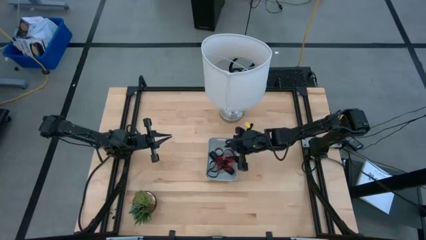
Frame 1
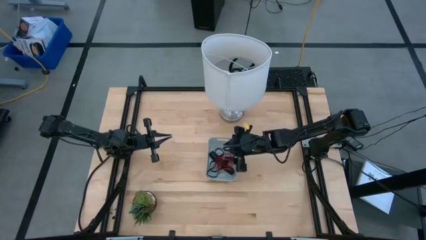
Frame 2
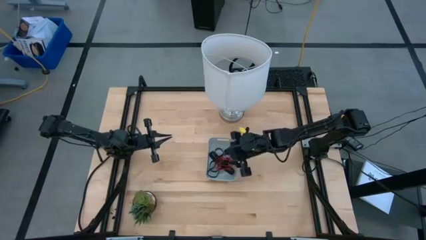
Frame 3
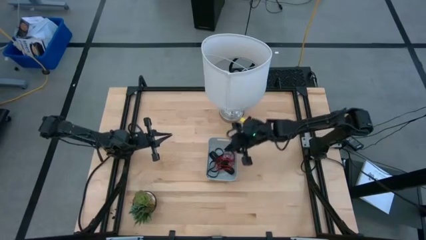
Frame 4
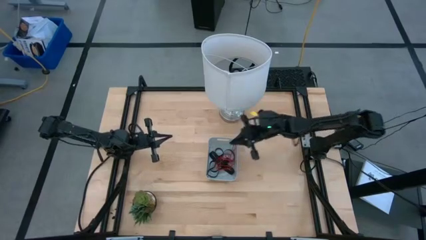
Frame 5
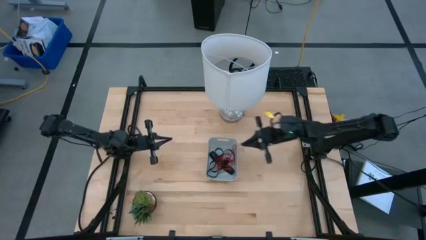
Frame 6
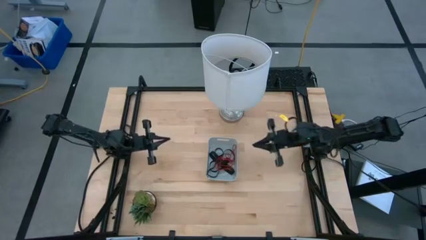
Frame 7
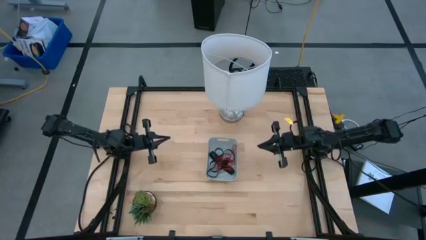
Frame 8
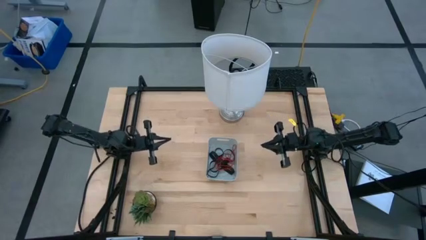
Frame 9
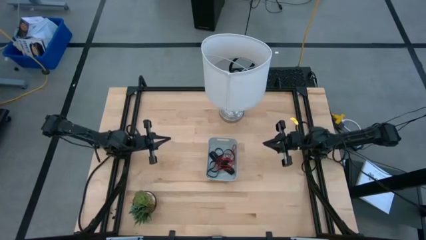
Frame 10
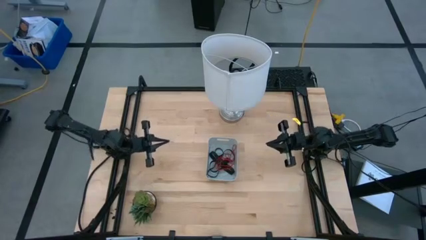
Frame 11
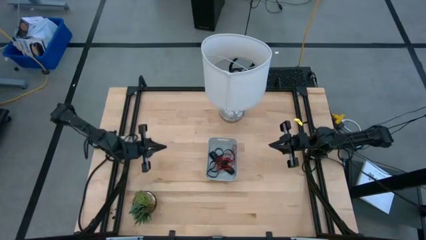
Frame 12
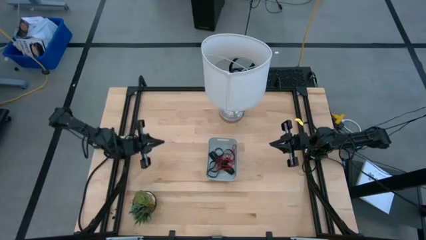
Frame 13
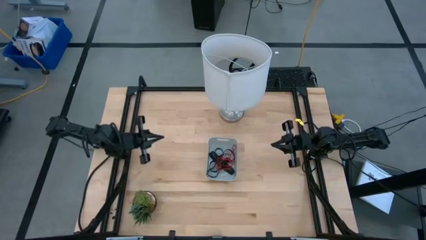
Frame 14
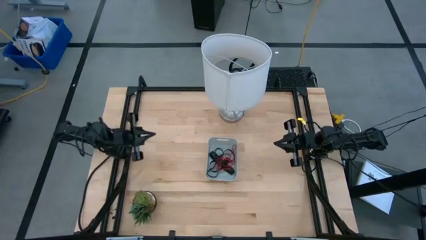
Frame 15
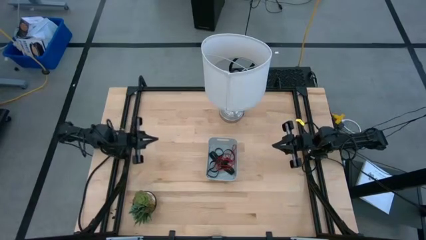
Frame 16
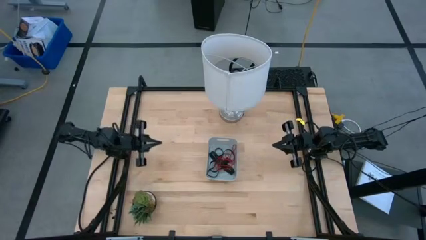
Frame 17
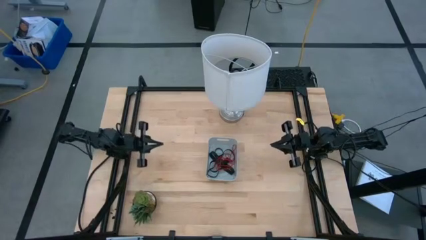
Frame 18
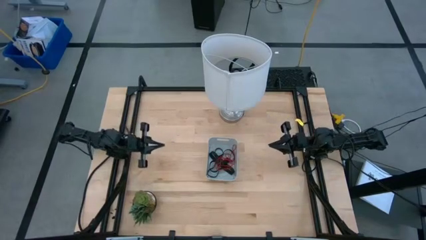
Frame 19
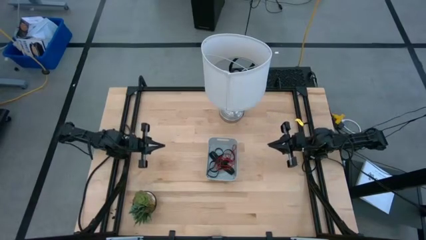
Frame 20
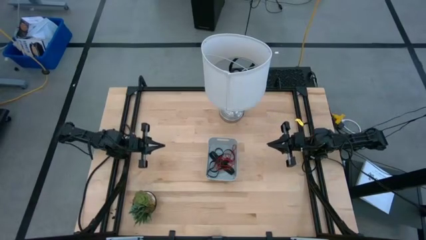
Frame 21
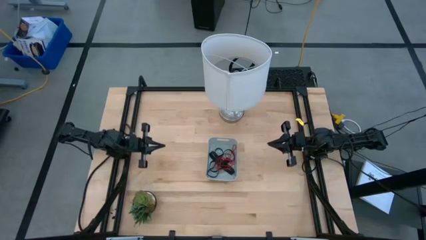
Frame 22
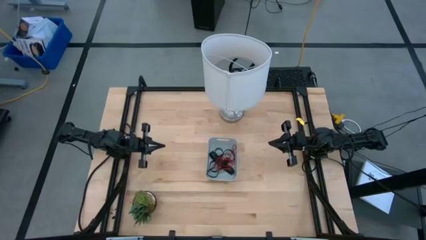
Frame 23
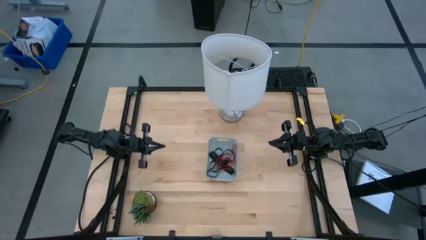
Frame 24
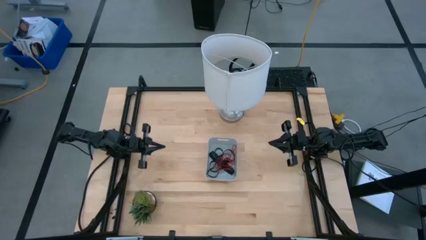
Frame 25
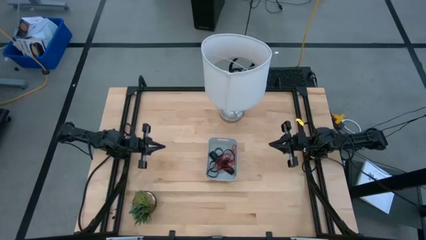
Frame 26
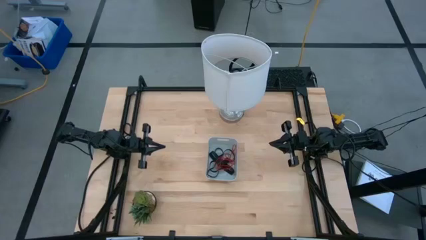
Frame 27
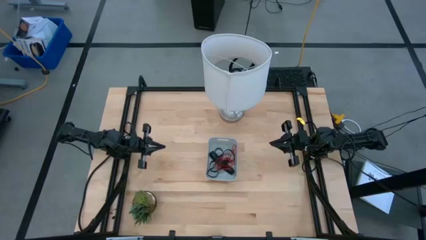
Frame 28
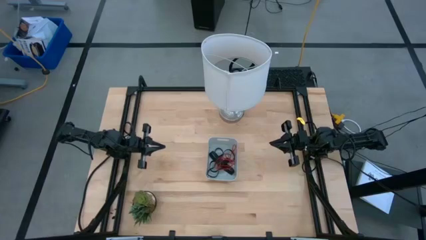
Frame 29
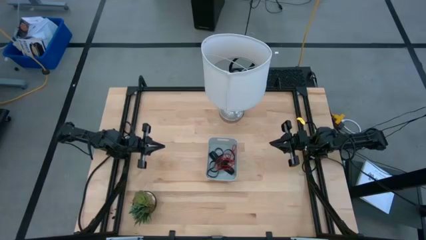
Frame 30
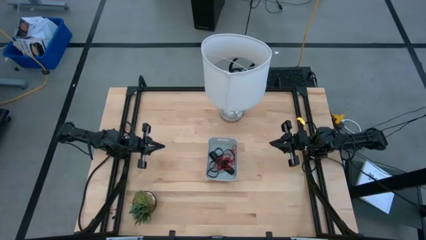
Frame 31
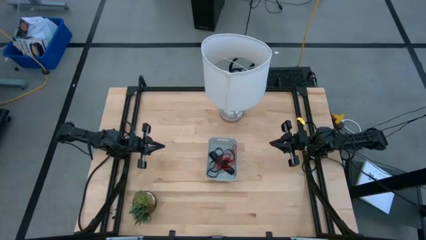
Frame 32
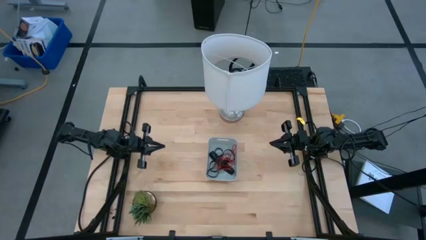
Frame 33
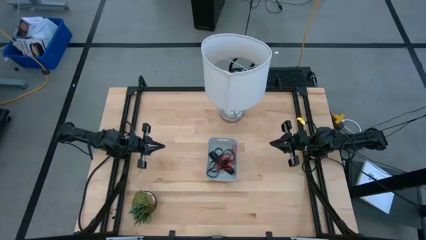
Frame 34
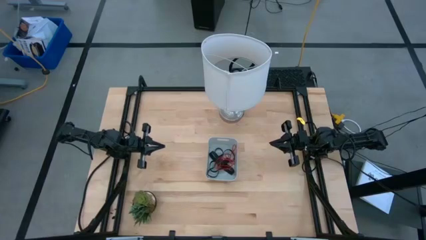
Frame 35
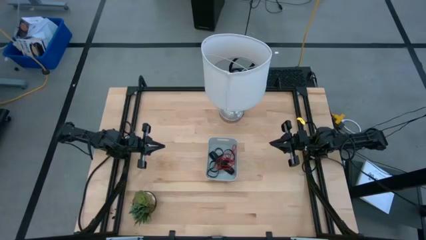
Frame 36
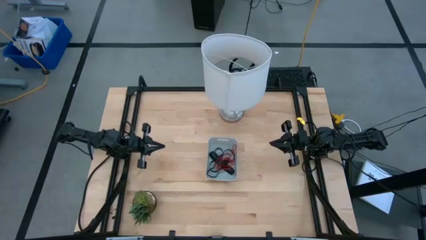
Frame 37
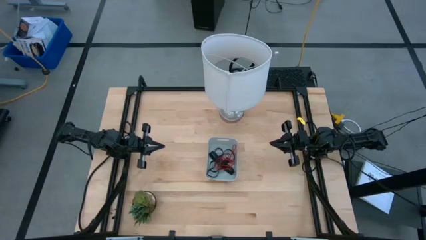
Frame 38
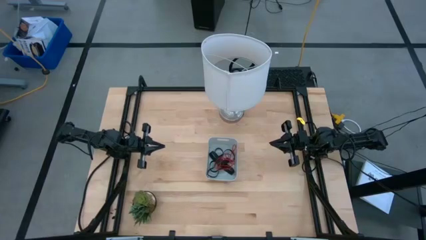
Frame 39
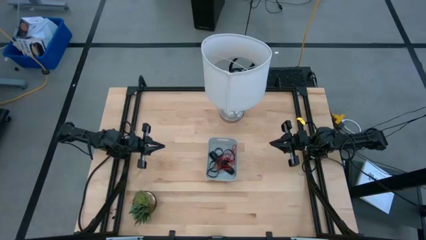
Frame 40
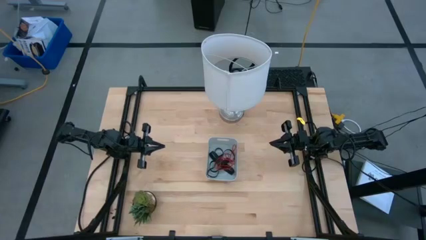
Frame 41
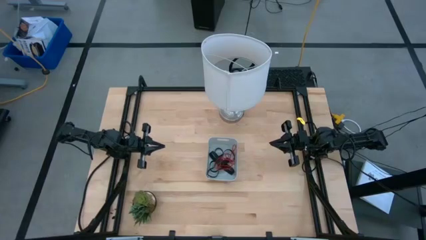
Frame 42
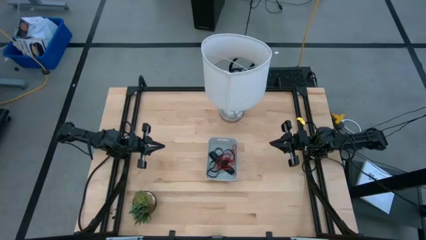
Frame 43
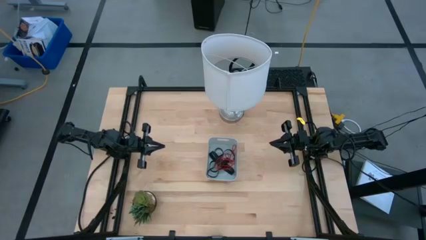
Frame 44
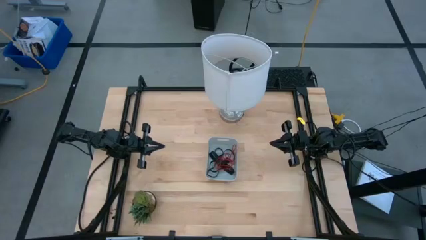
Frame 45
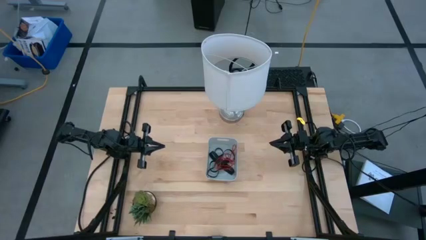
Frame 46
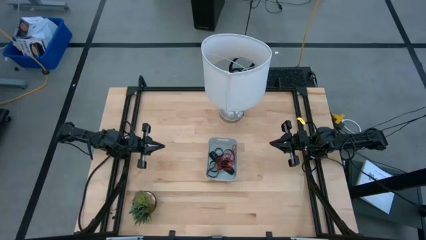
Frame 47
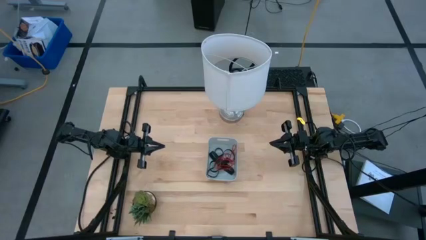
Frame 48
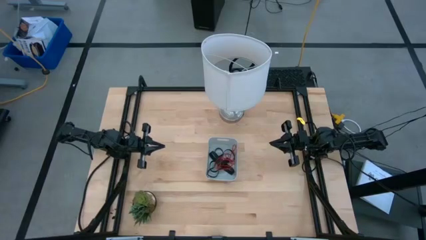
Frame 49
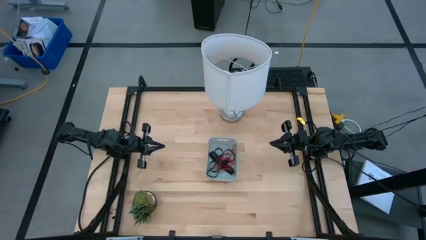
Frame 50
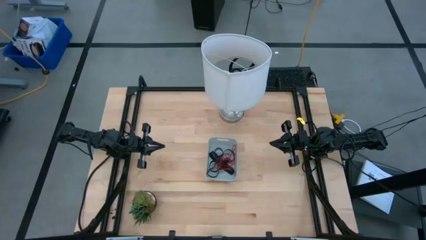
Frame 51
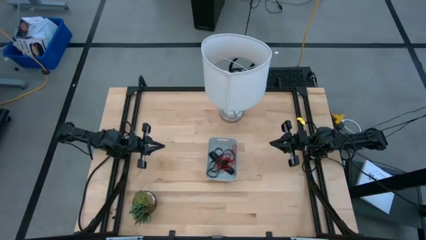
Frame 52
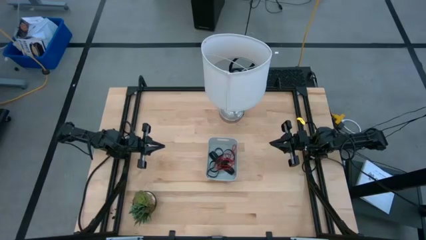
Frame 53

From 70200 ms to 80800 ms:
Task: Pick and place rubber bands into bin
Return to Home Position

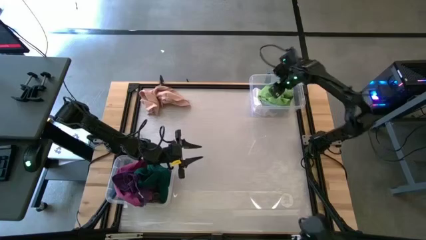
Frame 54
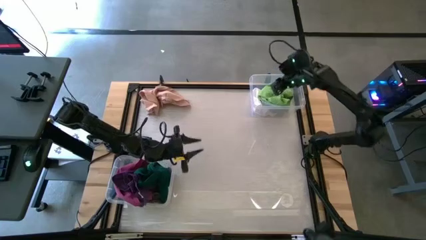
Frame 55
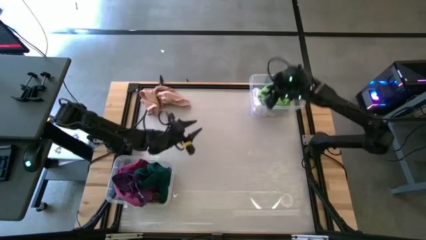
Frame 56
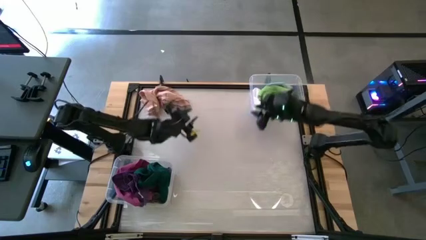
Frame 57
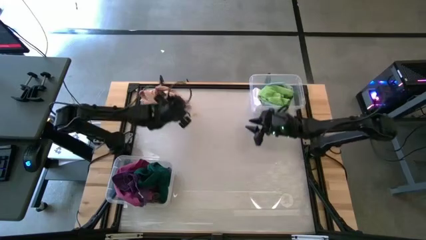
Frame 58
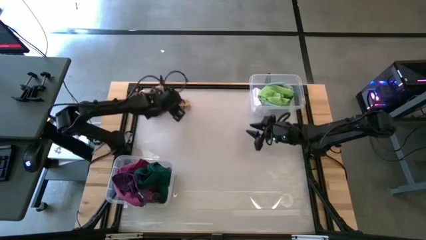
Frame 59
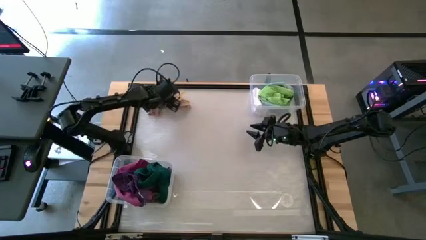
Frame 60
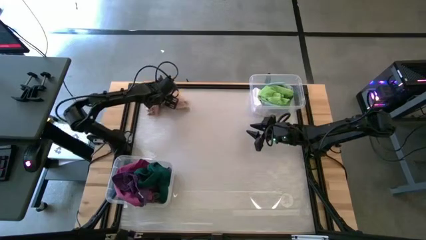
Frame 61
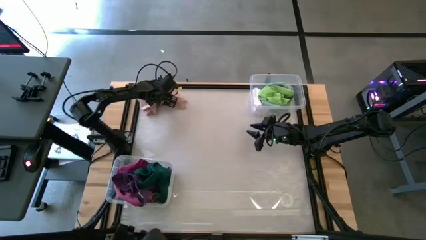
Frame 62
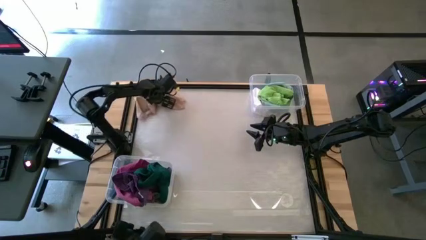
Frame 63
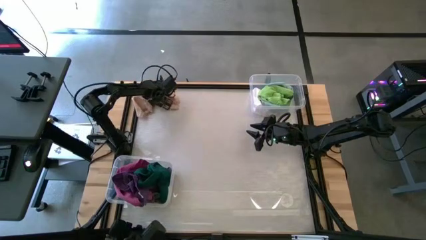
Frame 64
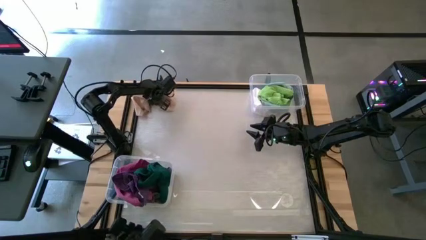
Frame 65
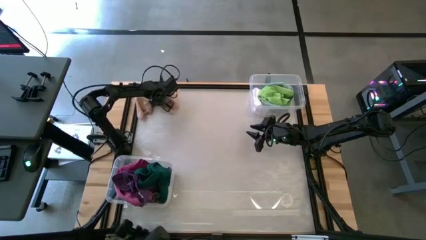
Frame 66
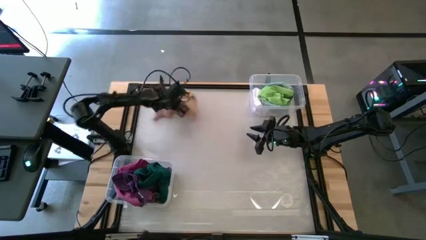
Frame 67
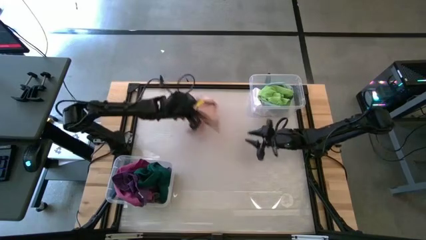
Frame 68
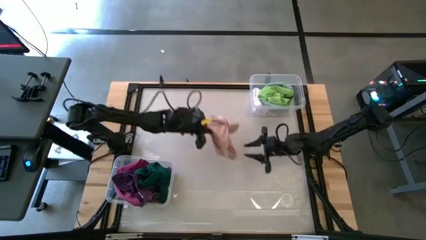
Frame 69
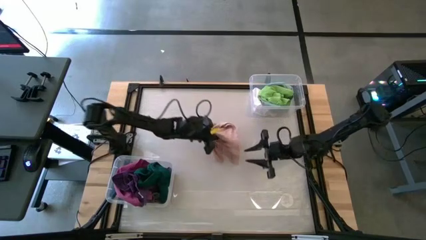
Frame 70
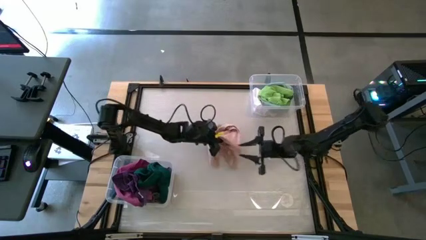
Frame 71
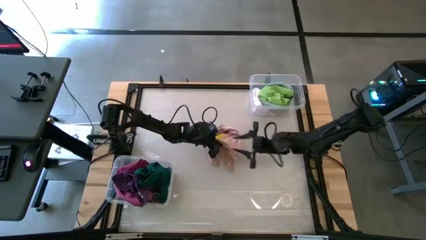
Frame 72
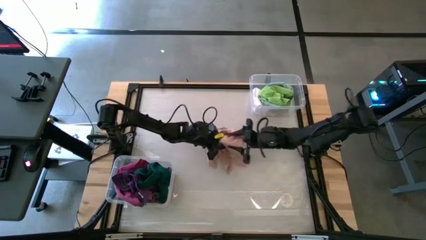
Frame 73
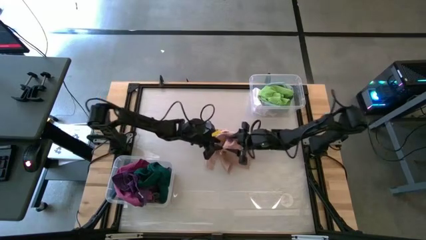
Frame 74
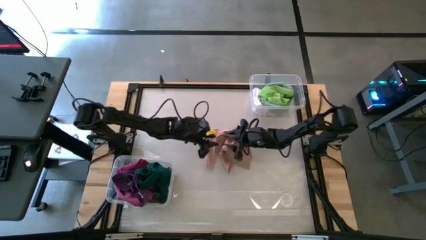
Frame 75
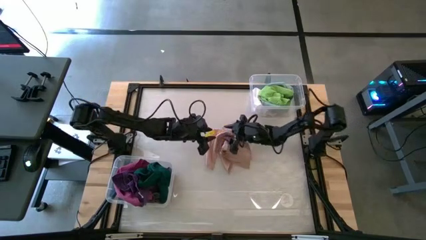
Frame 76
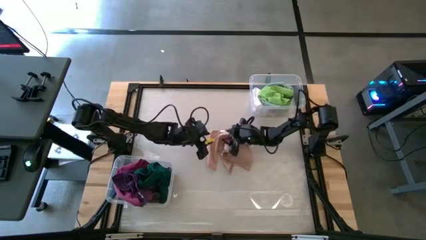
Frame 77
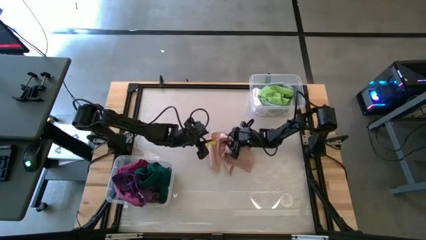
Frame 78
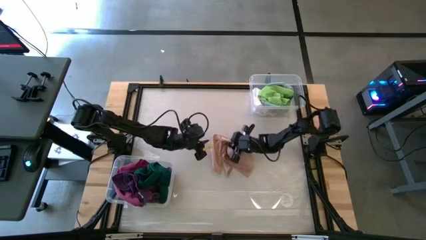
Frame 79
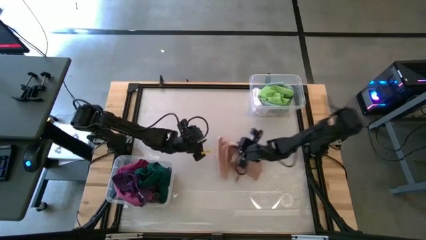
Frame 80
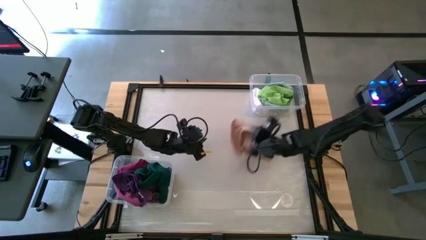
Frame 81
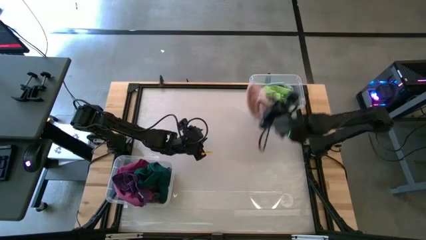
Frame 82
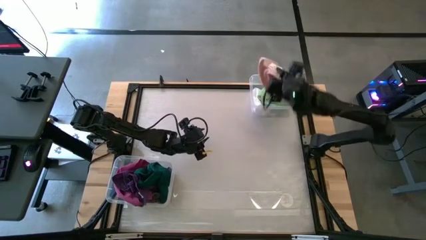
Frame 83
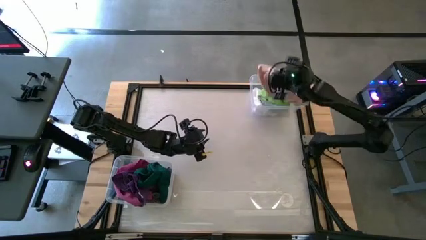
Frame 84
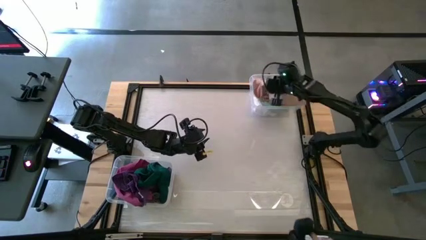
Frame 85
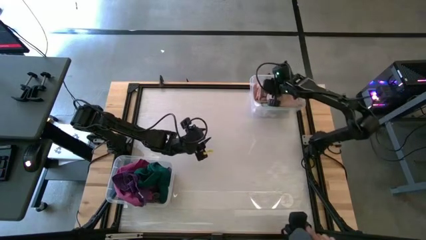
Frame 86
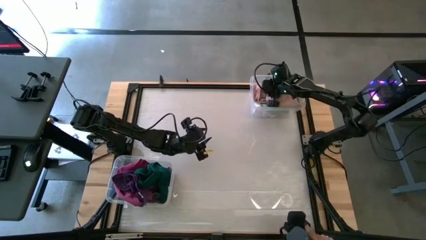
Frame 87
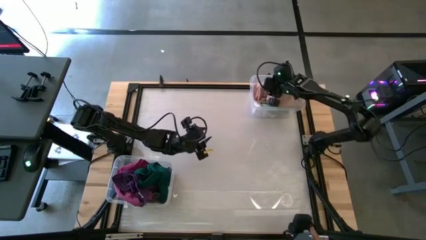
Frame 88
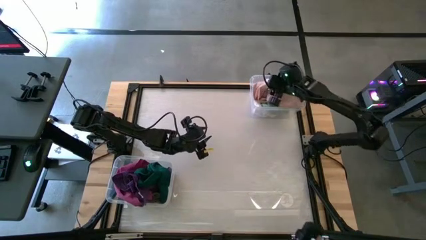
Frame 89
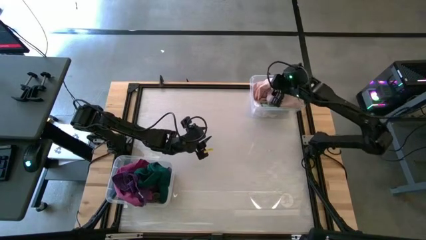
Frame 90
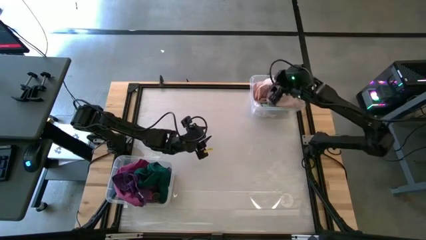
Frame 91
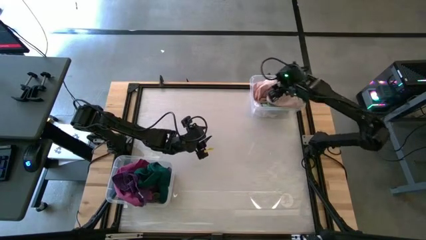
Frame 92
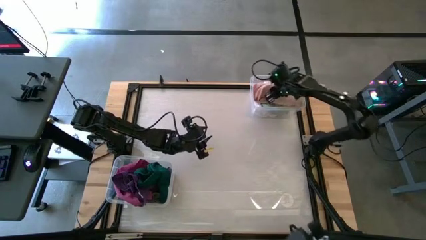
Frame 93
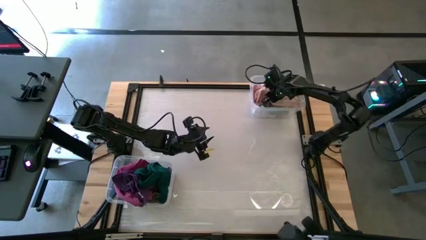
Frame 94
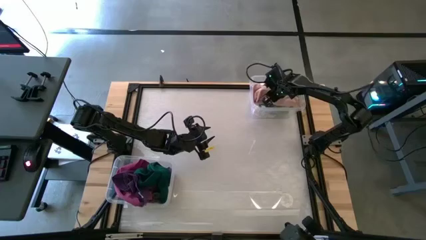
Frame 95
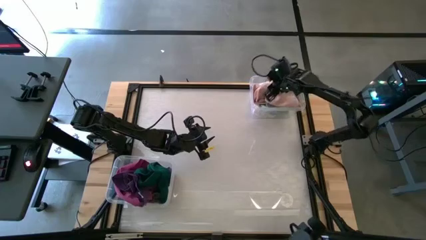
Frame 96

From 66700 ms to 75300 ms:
Task: Sort towels by color in basket
Put the brown towel into the top transparent bin
